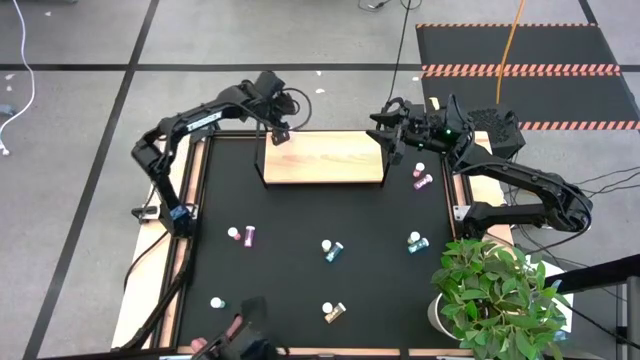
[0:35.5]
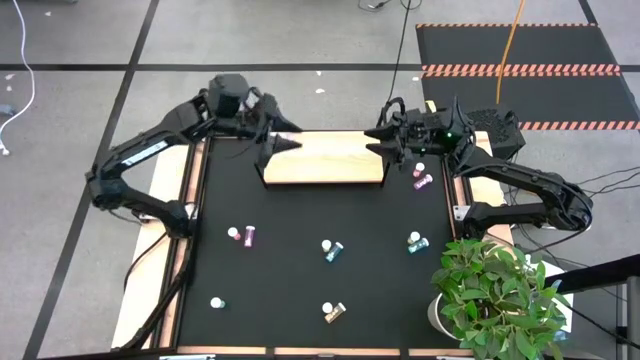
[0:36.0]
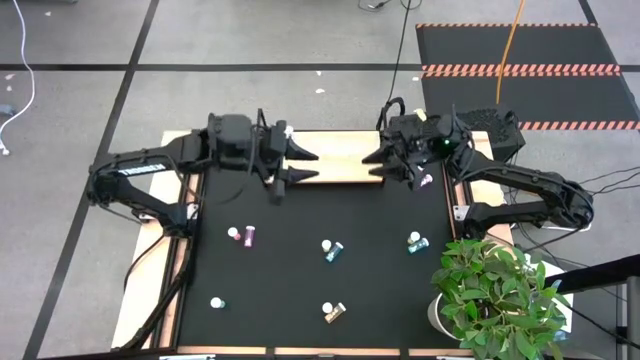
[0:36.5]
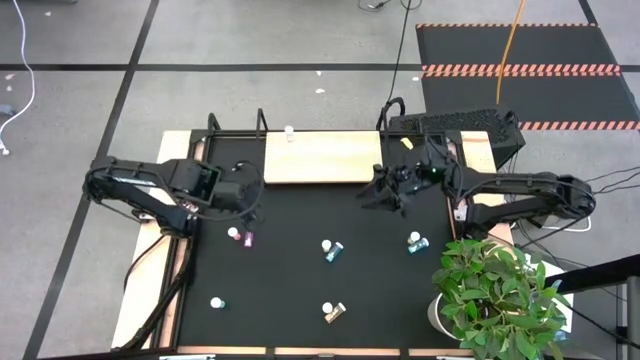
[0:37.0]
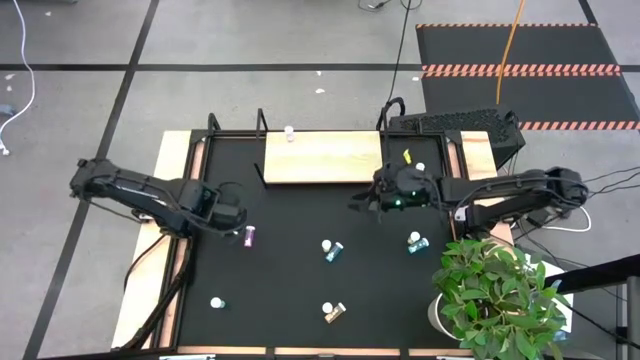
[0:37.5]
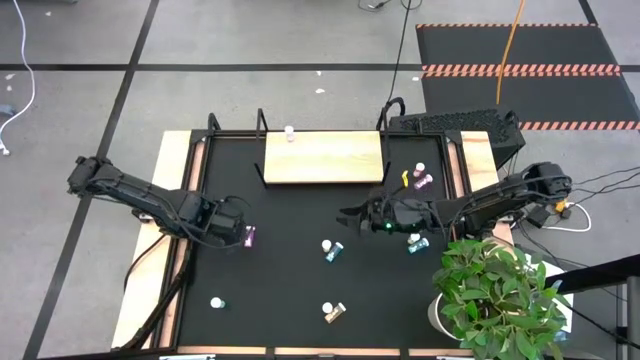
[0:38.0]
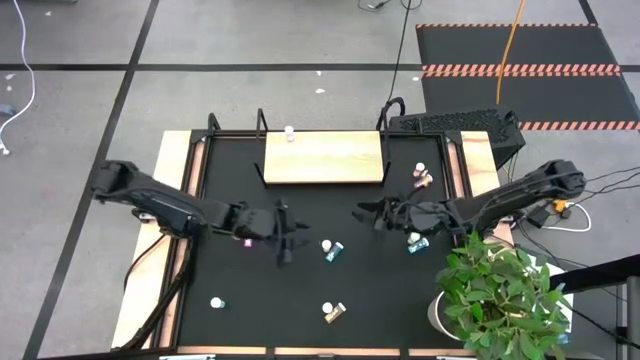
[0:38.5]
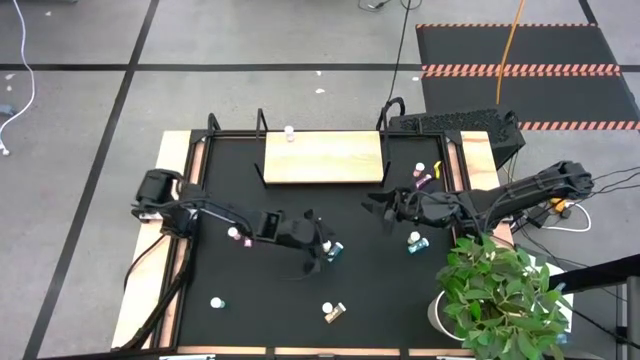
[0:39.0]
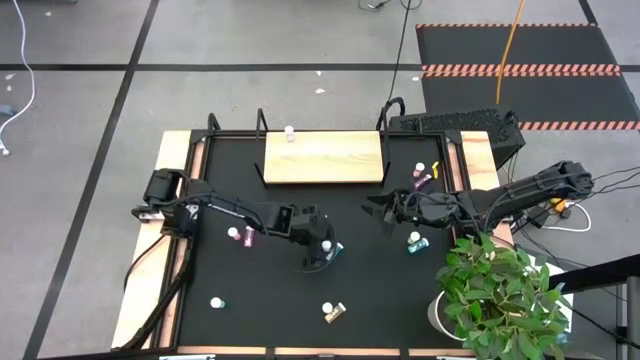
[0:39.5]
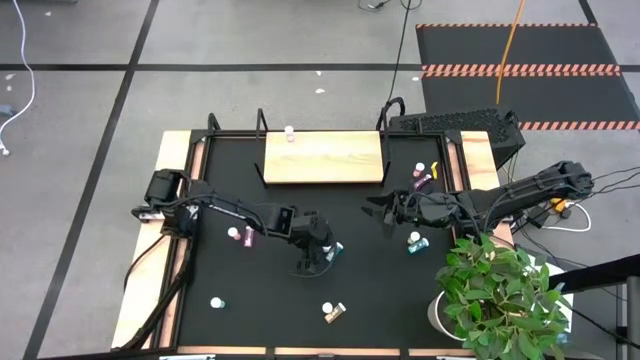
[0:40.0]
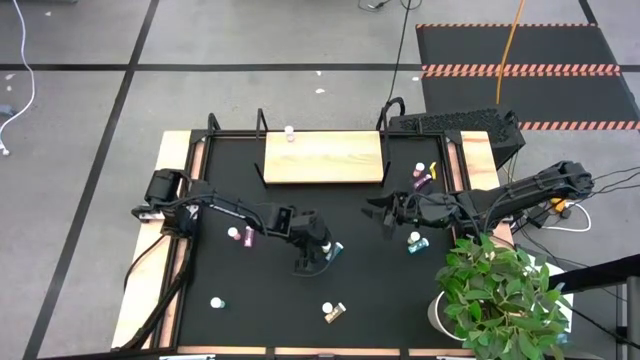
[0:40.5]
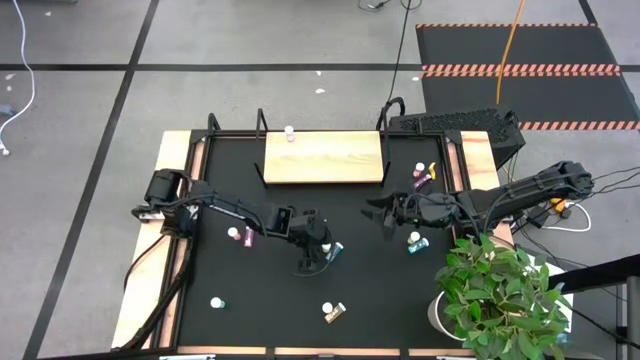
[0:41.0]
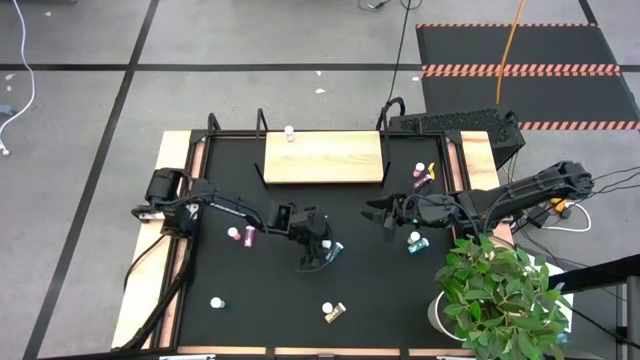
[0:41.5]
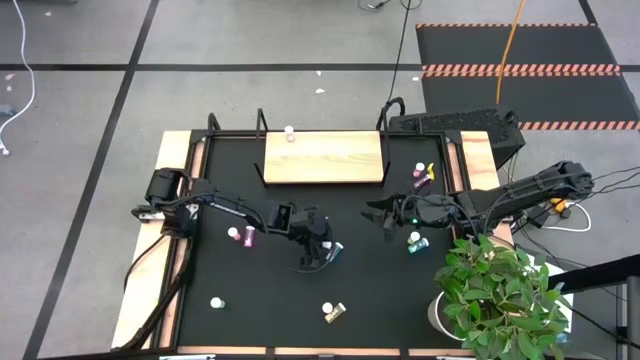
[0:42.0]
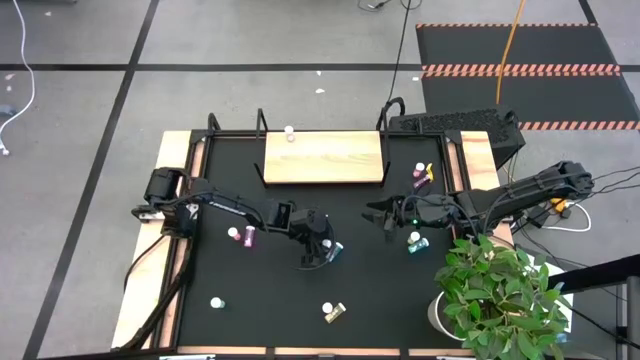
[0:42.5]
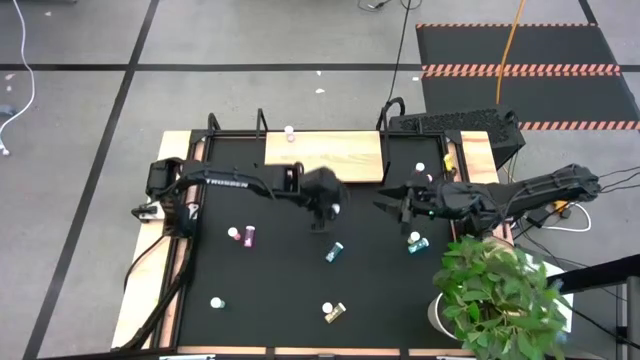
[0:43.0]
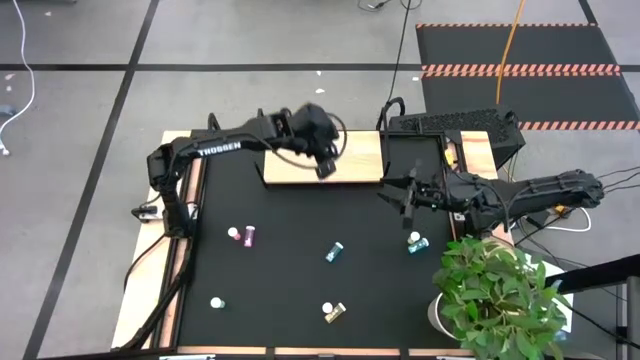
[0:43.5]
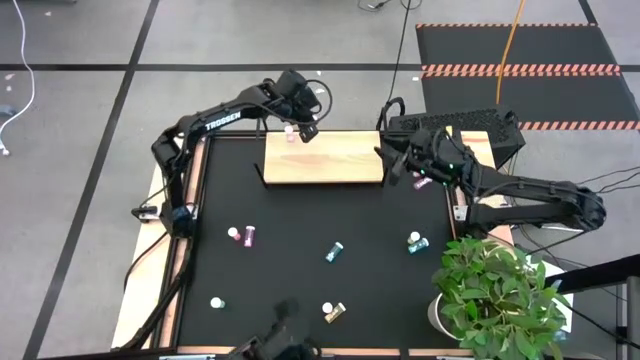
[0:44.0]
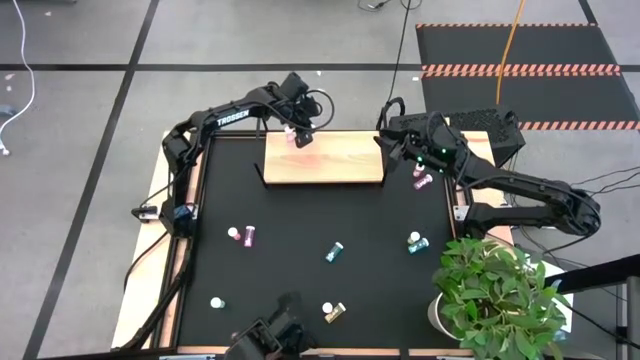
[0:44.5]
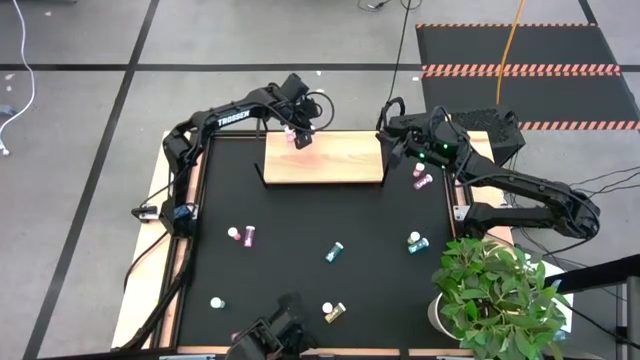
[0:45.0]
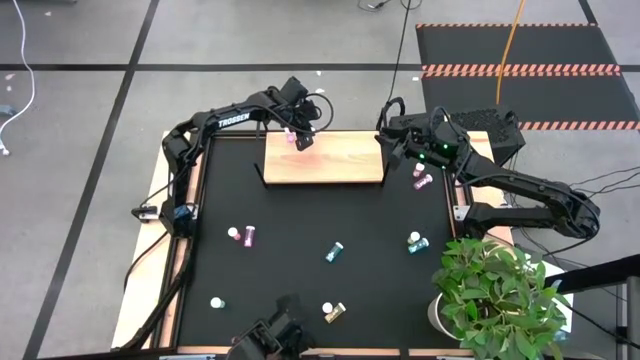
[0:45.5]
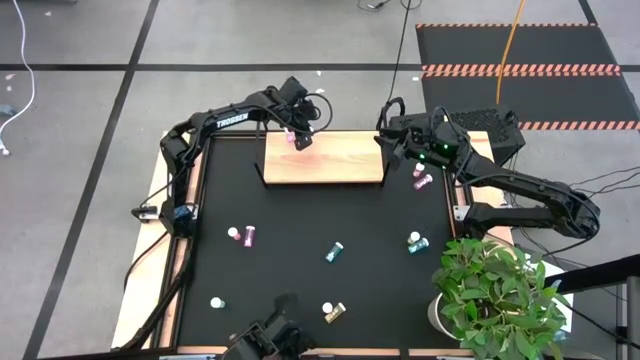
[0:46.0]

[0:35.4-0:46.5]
Task: Pick and place medicine bottles onto shelf by color
Put the top left yellow pill bottle on the shelf

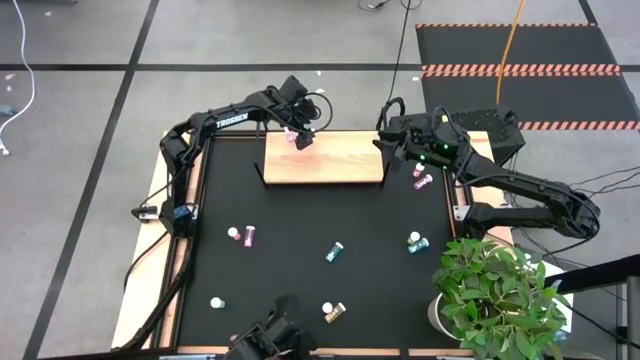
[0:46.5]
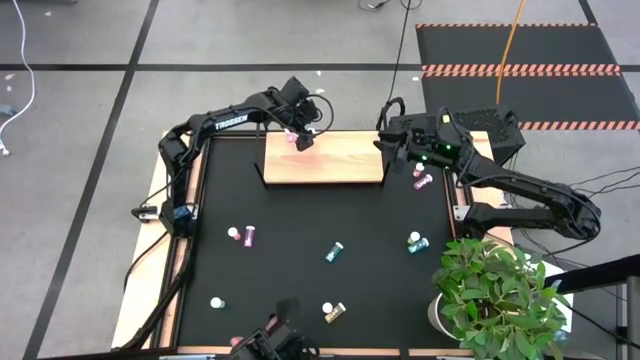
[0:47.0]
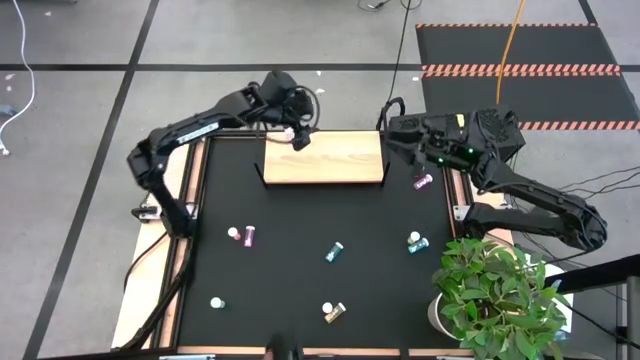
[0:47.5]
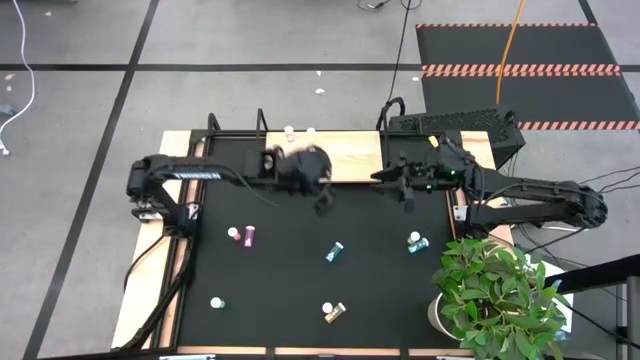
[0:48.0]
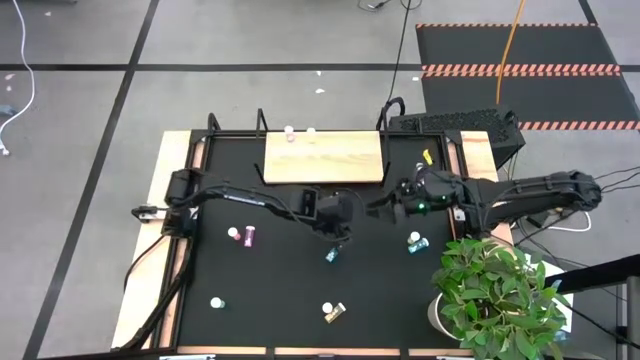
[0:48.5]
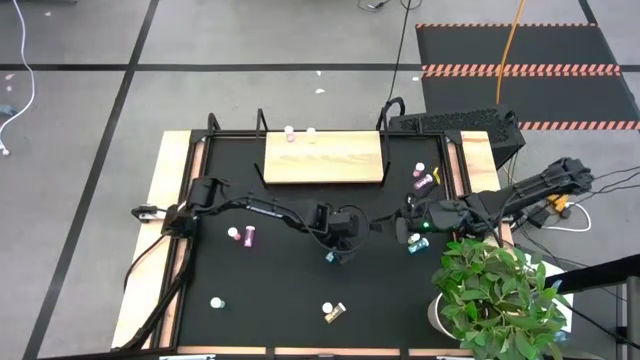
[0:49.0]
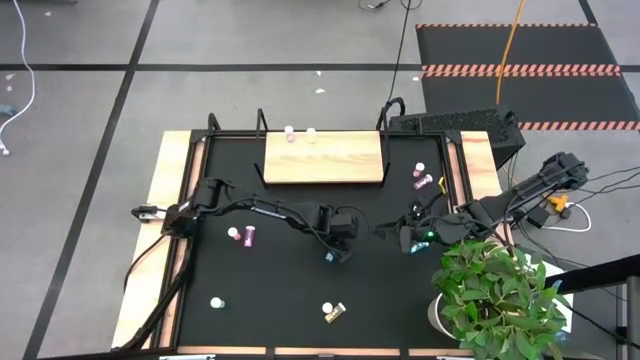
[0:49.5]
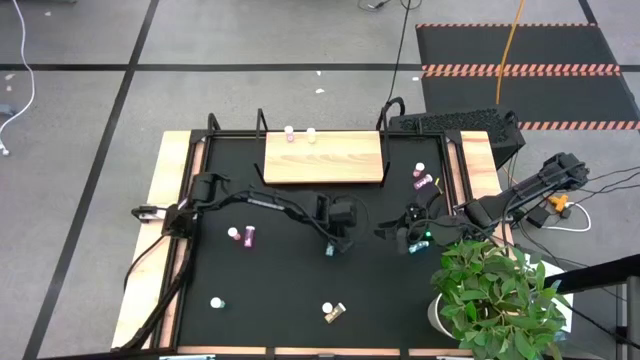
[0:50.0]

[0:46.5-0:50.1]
Put the left blue pill bottle on the shelf
